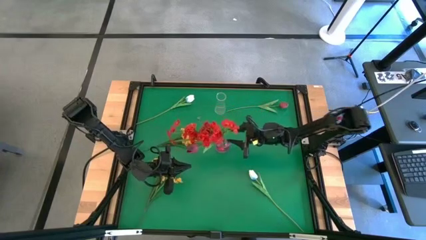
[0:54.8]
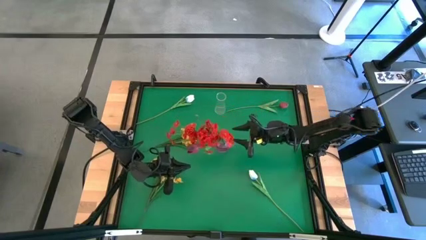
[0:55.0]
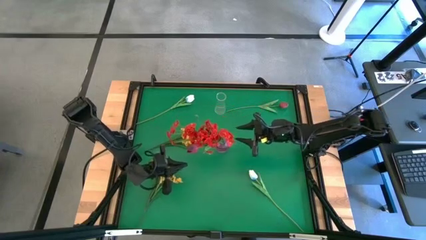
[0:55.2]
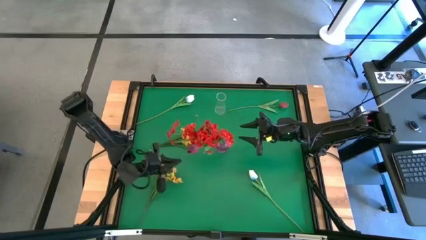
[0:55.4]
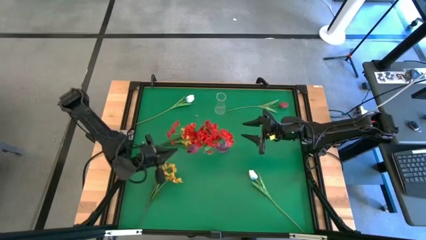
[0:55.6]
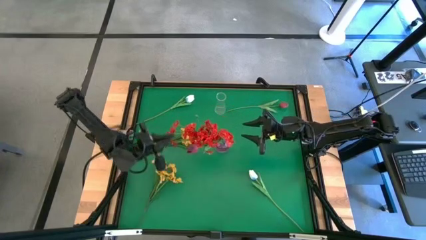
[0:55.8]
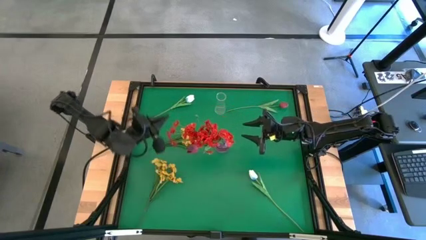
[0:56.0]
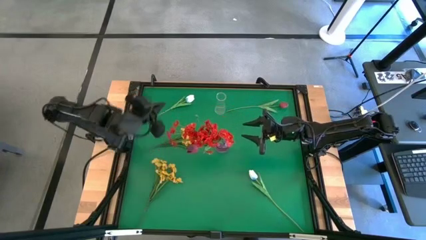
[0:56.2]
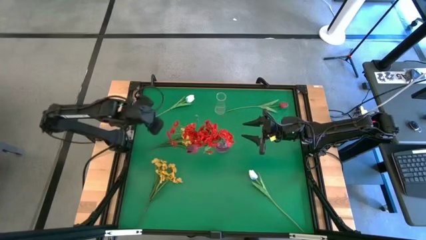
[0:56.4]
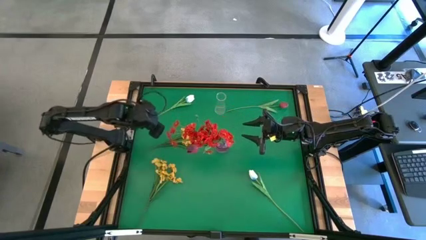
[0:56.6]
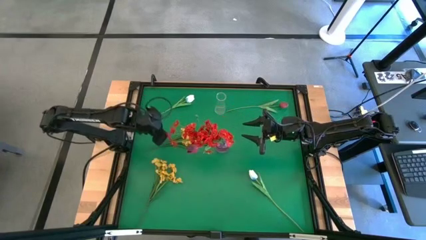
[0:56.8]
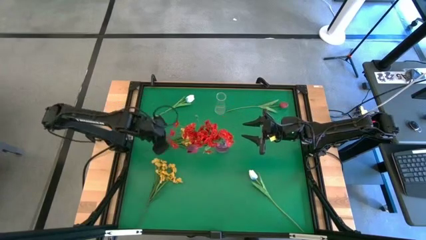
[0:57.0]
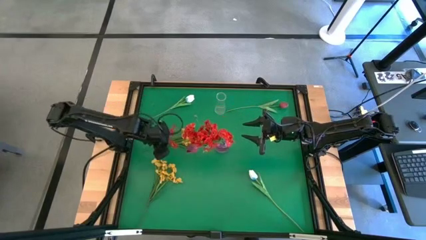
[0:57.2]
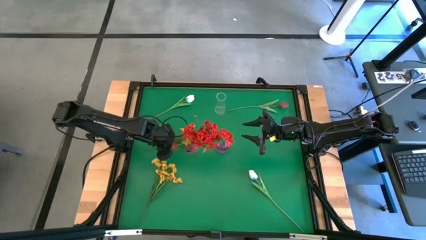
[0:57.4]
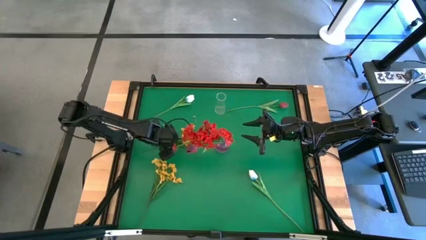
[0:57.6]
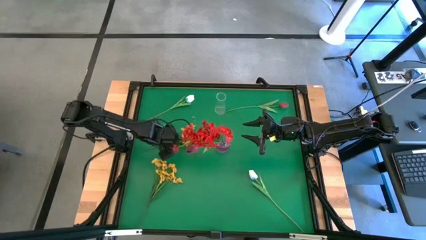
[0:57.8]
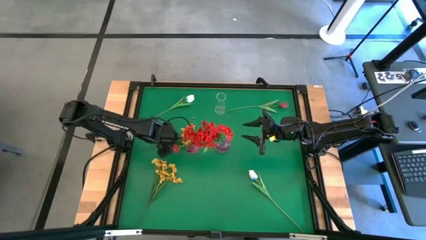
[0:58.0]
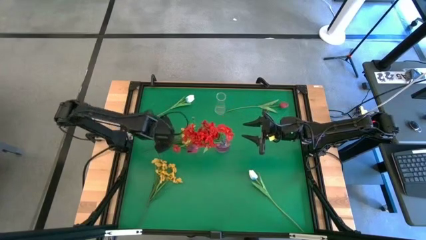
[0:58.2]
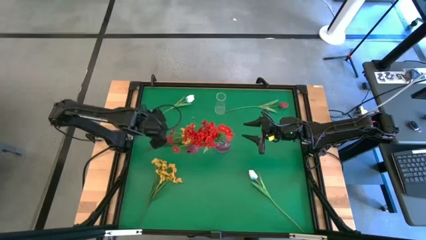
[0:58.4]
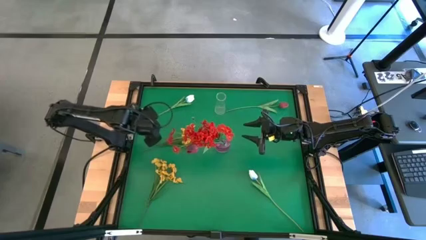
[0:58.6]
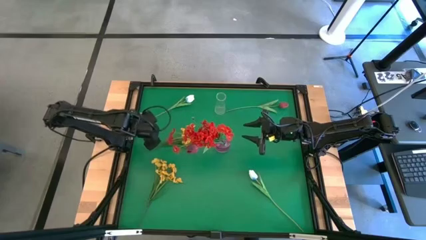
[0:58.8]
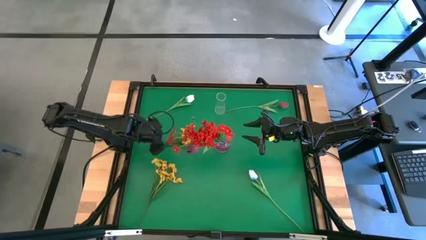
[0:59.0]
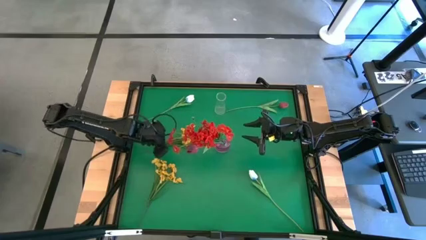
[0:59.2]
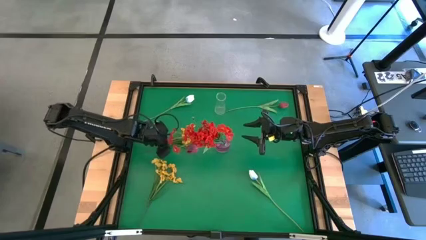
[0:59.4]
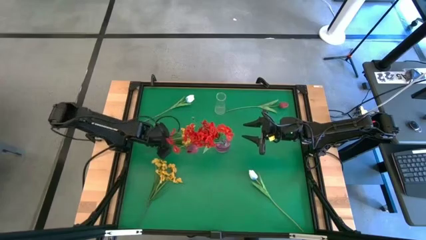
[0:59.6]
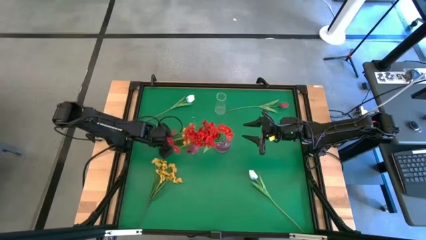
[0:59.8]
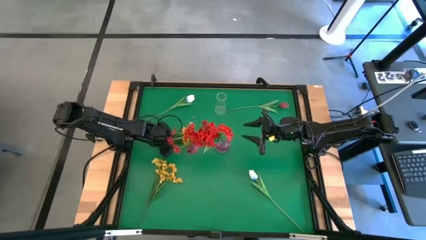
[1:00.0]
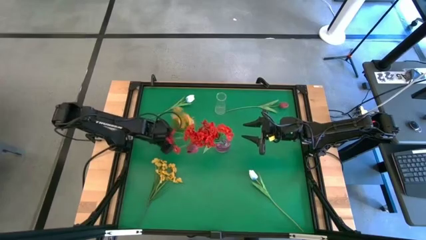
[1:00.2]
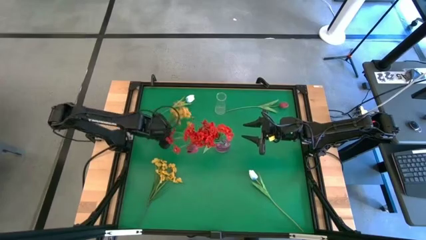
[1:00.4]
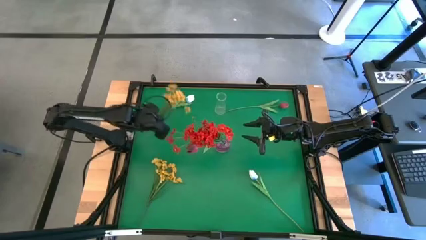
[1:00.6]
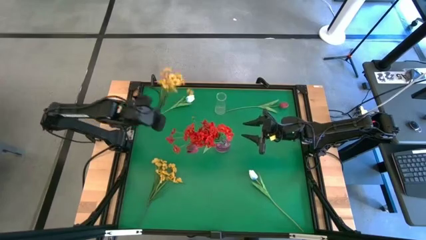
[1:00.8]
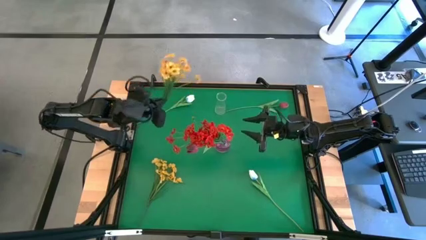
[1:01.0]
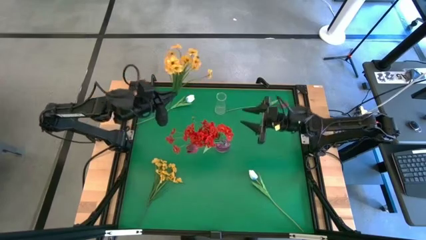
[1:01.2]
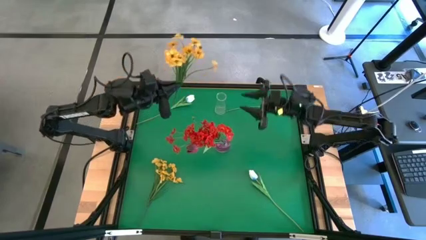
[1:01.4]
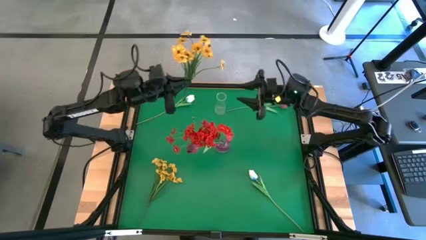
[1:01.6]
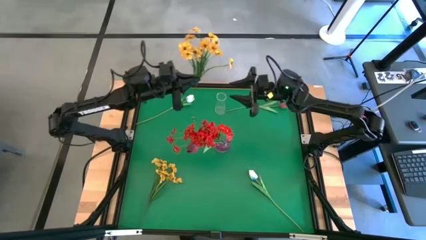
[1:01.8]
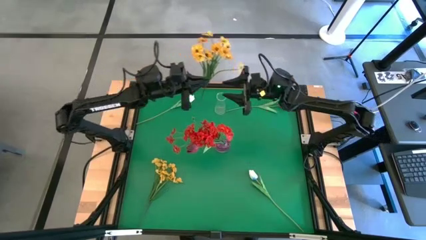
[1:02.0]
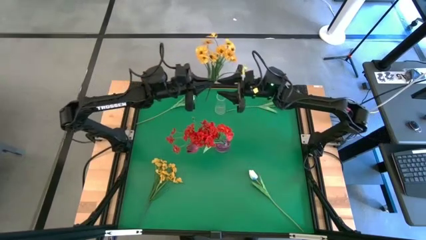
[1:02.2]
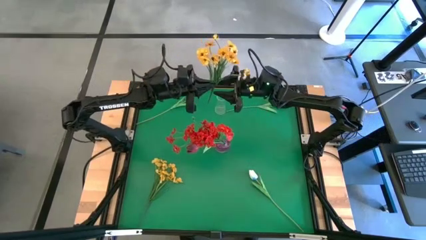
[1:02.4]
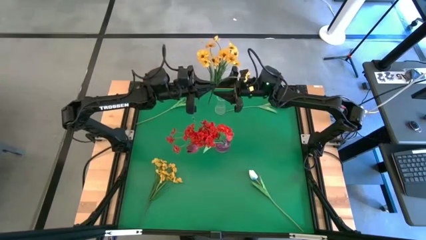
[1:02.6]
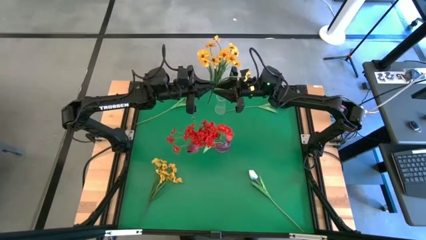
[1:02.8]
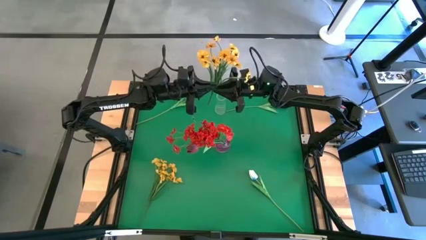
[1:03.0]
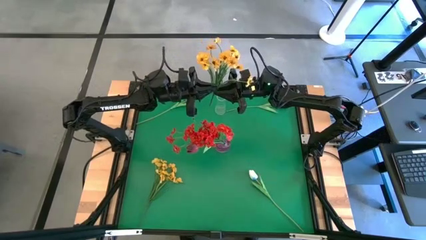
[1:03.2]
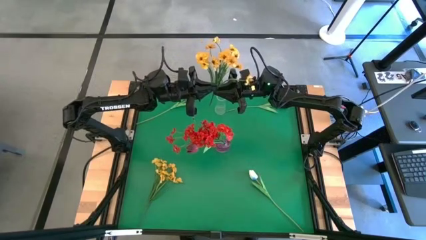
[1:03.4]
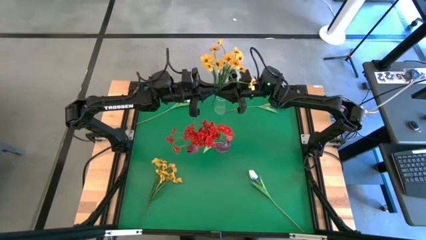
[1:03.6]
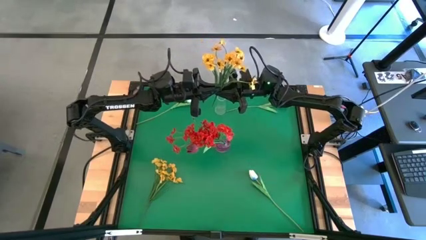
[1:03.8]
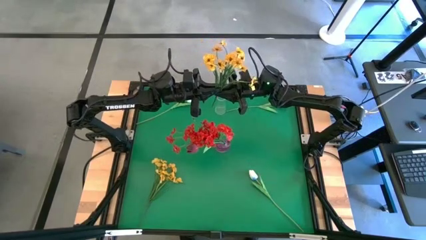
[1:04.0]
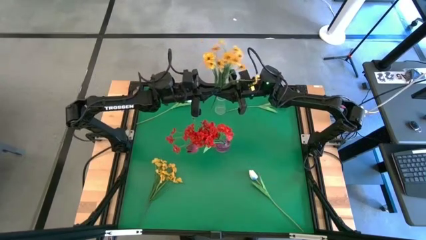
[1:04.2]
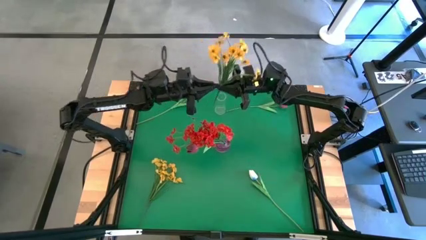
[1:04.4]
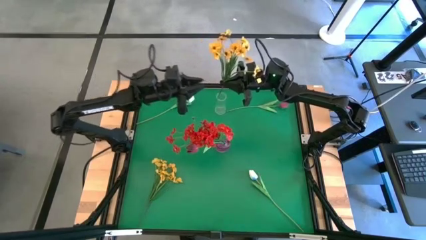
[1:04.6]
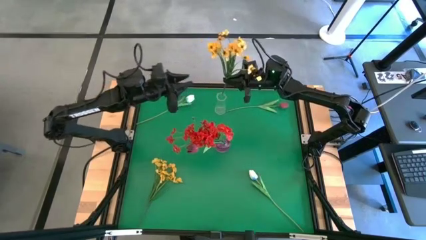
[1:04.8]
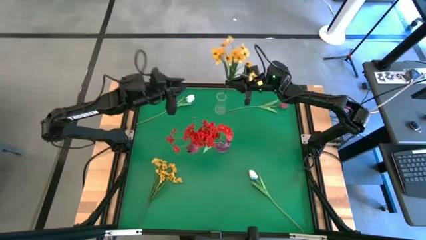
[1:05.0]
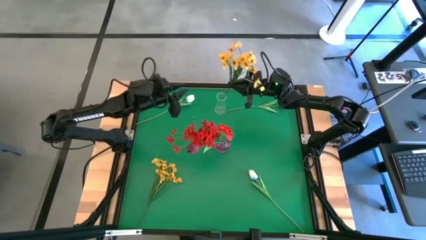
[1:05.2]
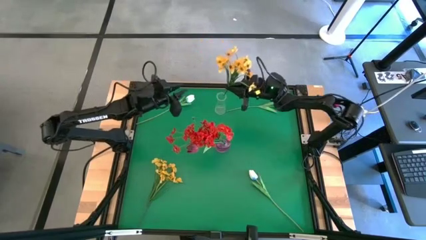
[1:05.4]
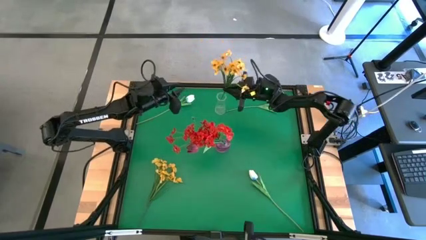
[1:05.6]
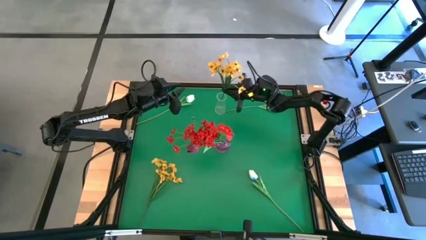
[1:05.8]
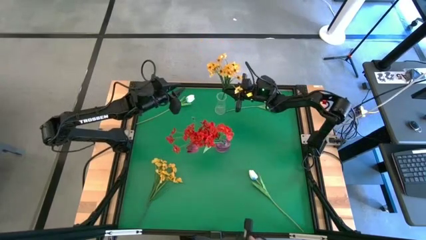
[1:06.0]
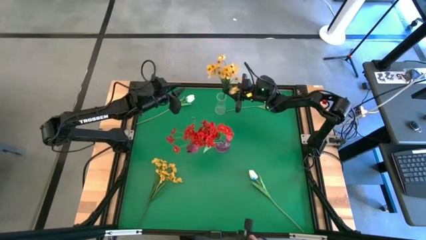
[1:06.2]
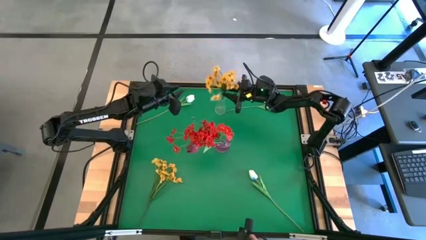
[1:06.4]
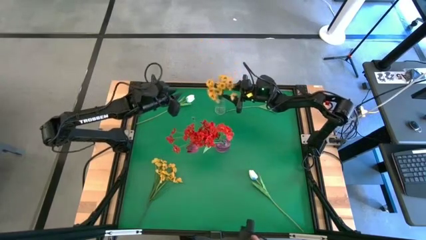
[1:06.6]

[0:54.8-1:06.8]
Task: Sort flowers into vase by color
Put the top yellow flowers into the transparent vase

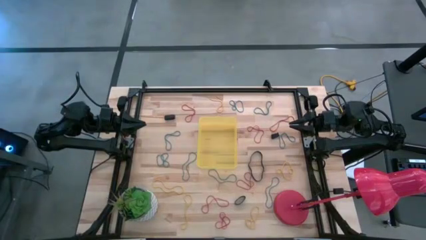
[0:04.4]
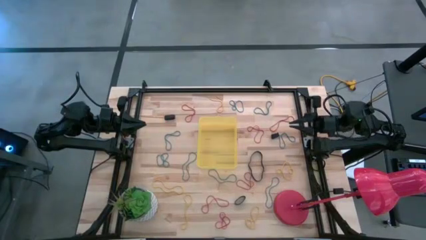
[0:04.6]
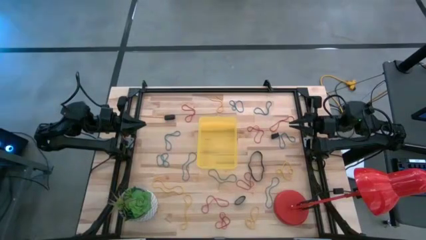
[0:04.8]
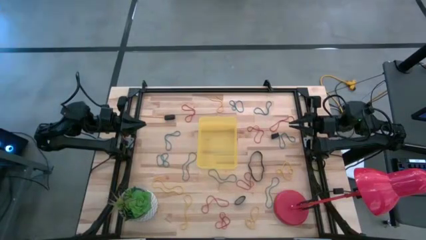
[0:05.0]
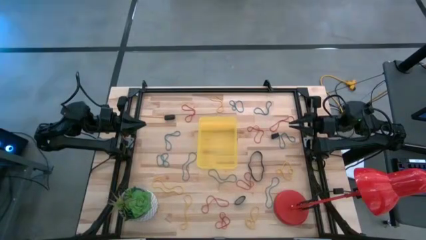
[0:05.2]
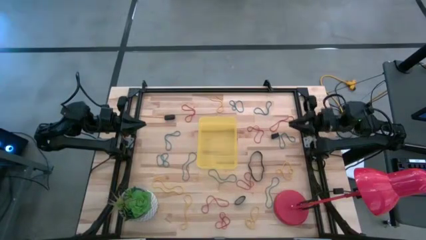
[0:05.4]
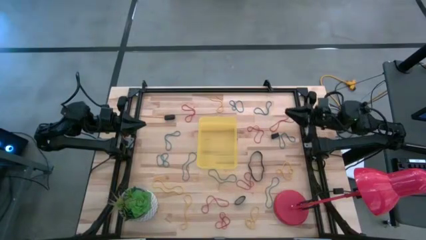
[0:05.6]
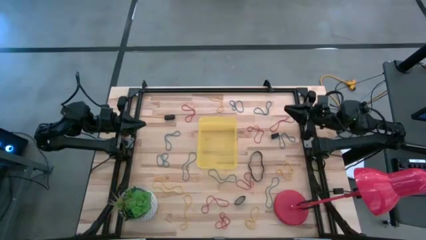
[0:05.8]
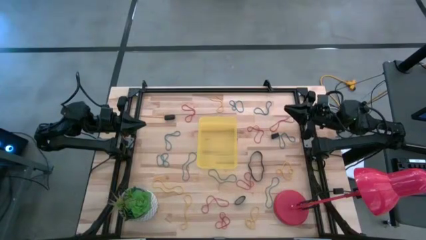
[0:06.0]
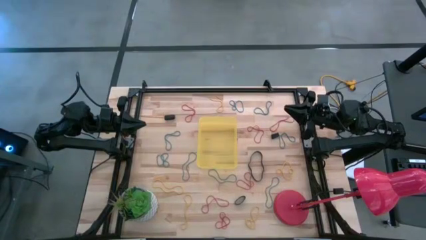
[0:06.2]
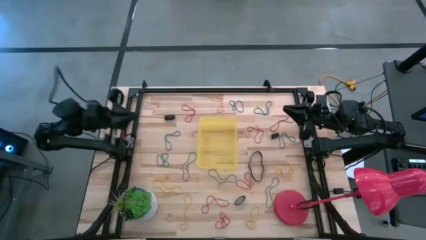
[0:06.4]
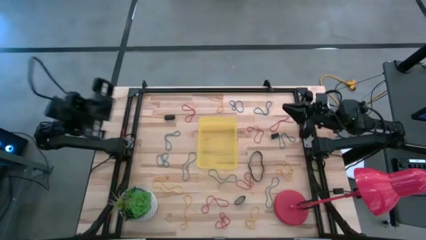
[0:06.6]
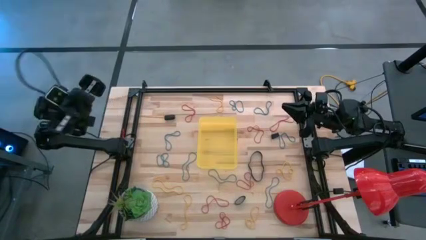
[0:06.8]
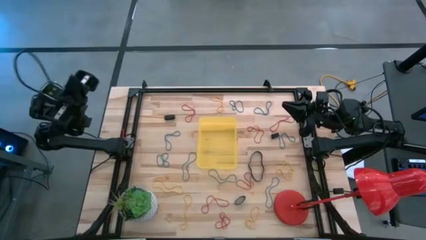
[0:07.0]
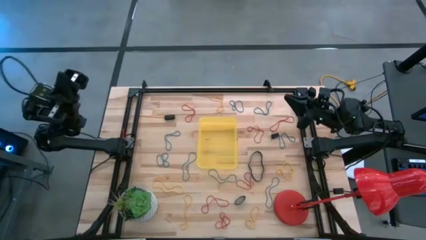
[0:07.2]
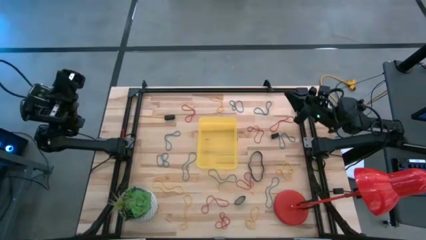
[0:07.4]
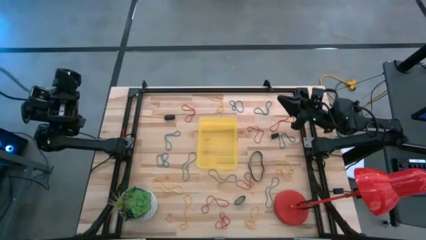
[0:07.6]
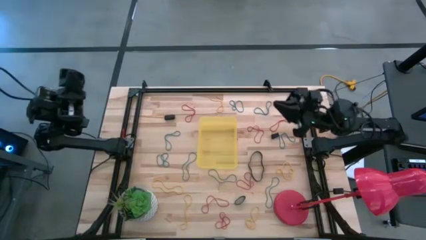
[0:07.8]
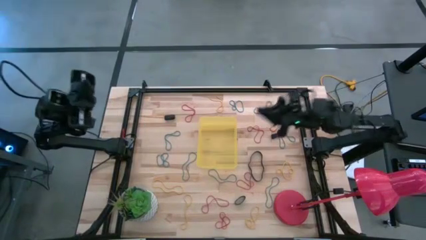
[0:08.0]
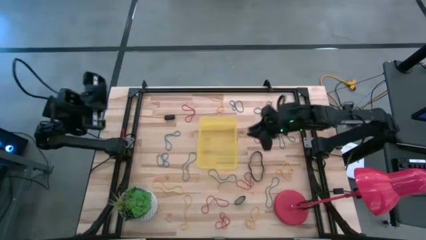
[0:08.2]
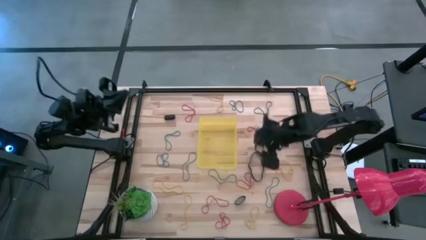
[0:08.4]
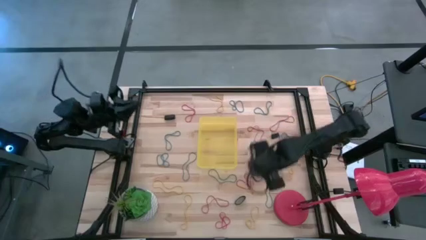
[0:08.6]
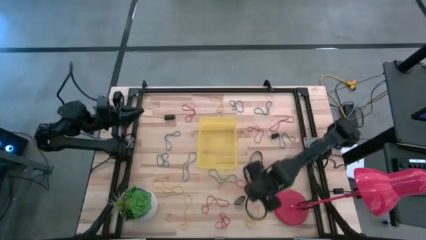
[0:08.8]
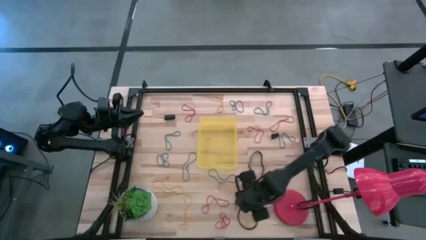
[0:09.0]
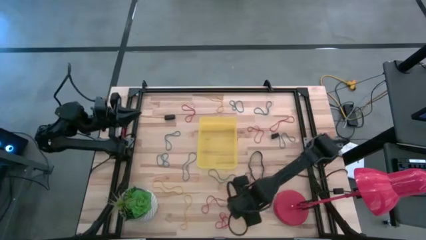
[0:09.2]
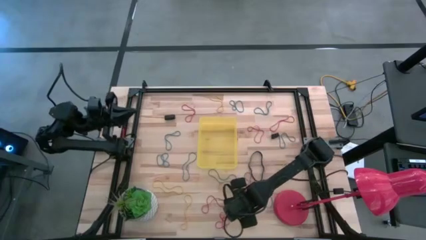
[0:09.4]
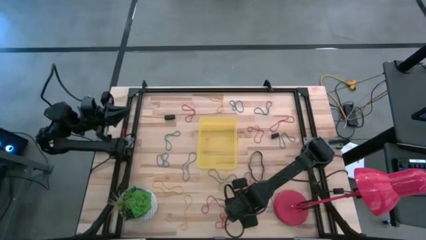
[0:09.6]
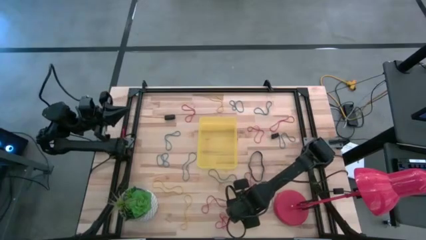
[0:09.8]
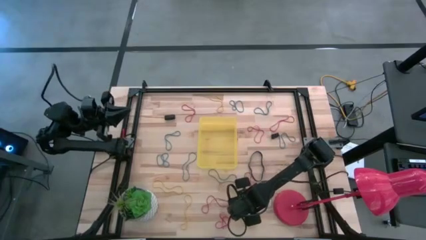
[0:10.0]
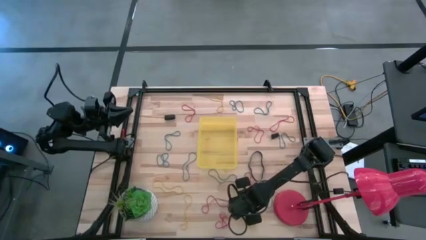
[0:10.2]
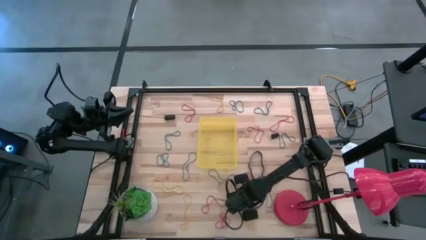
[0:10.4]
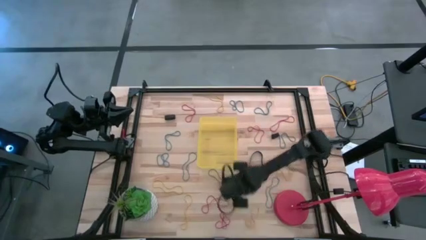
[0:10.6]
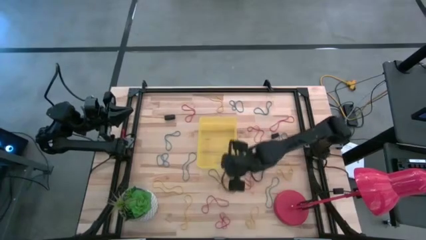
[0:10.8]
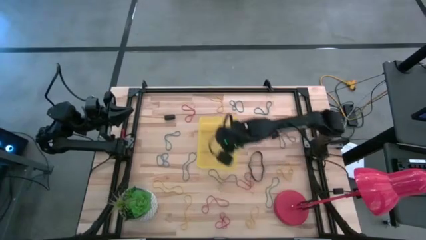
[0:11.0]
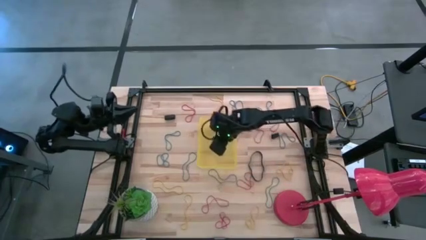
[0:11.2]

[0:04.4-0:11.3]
Task: Pick and place rubber bands into bin
Put the black rubber band into the yellow bin
